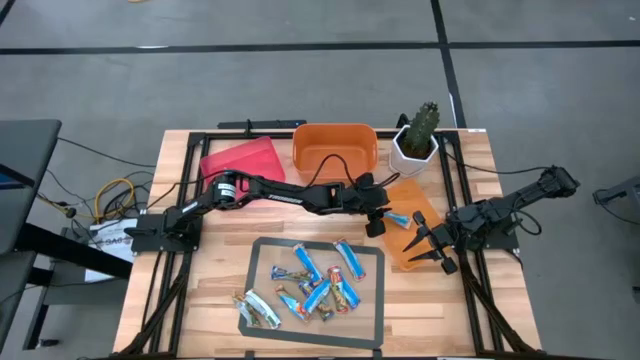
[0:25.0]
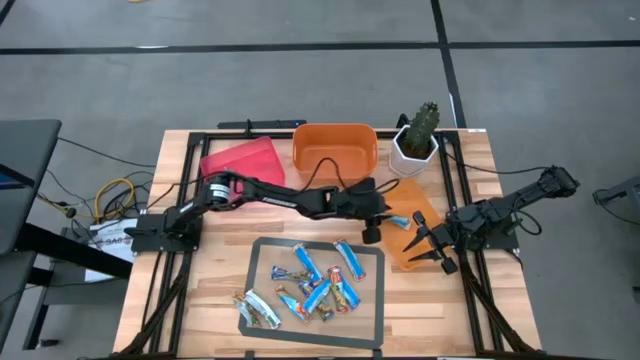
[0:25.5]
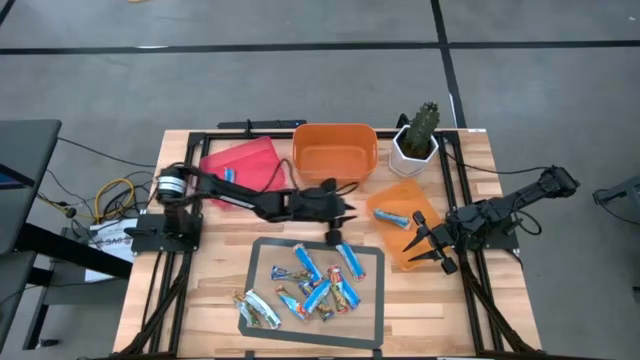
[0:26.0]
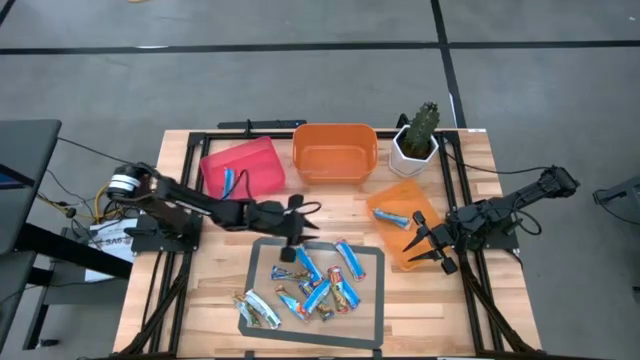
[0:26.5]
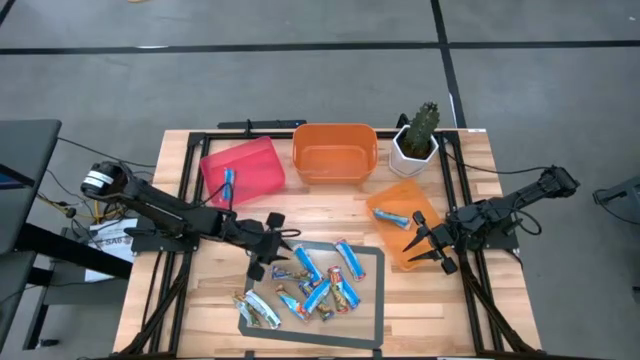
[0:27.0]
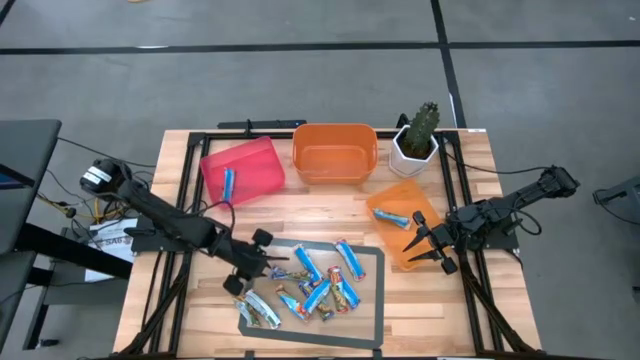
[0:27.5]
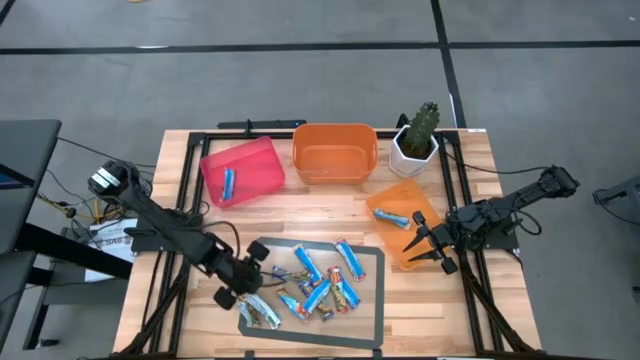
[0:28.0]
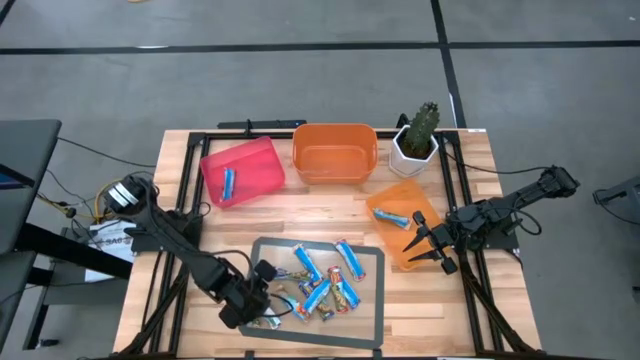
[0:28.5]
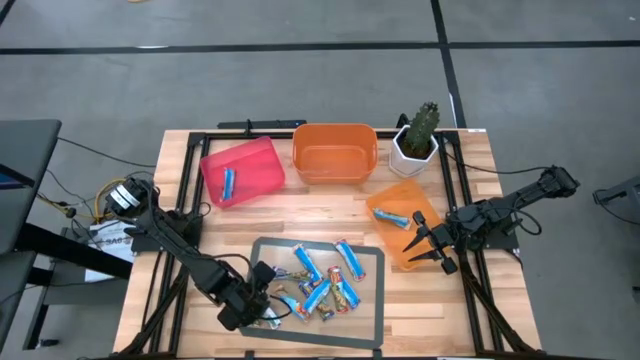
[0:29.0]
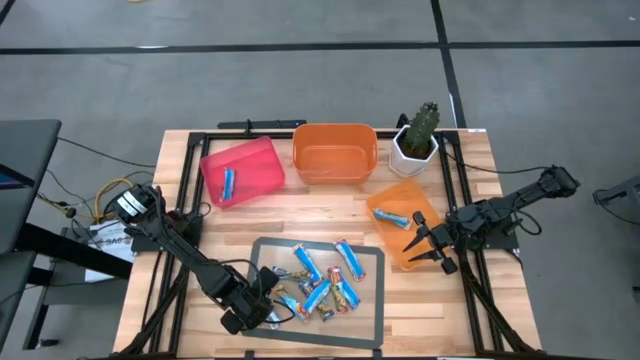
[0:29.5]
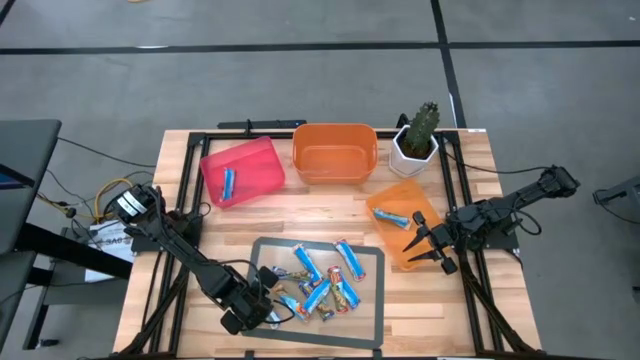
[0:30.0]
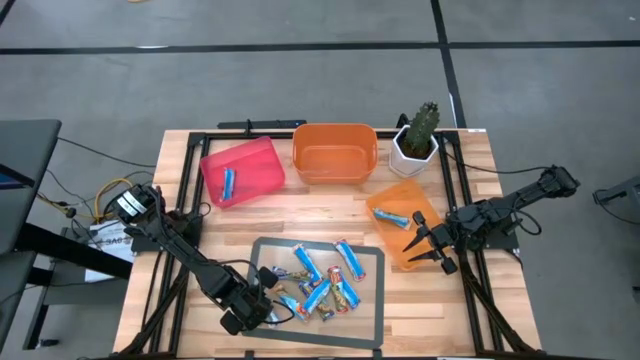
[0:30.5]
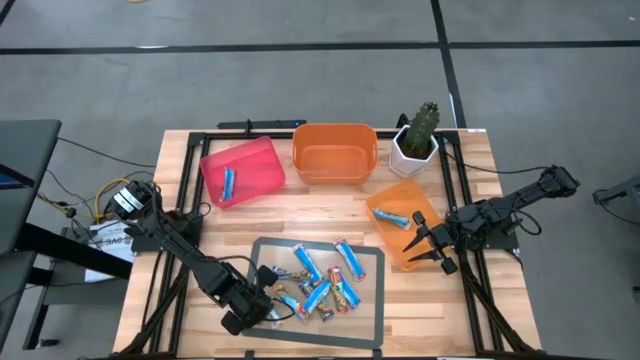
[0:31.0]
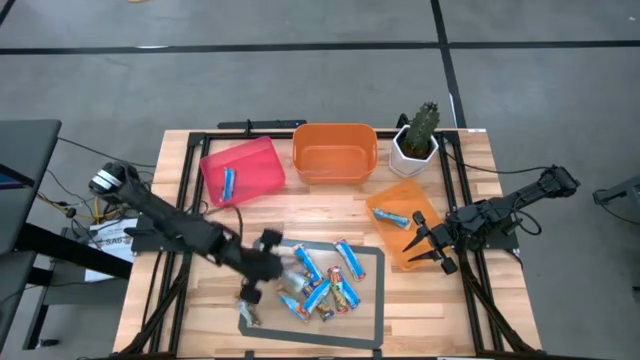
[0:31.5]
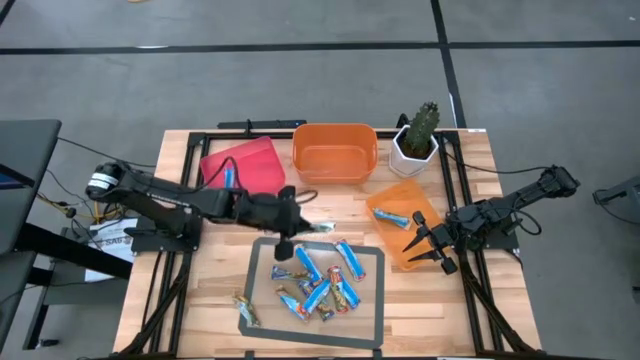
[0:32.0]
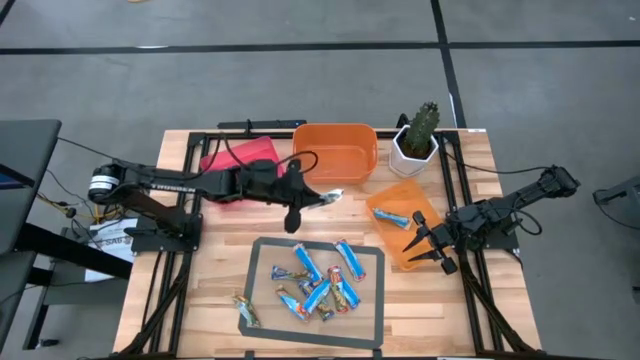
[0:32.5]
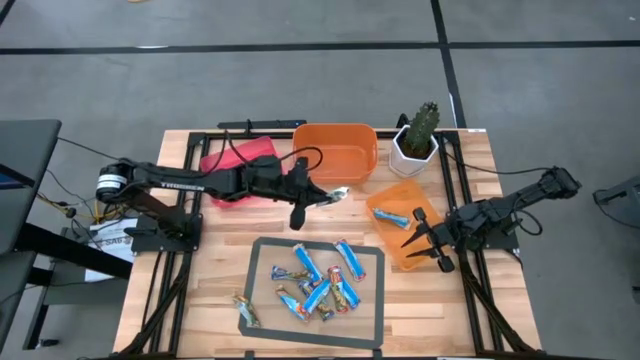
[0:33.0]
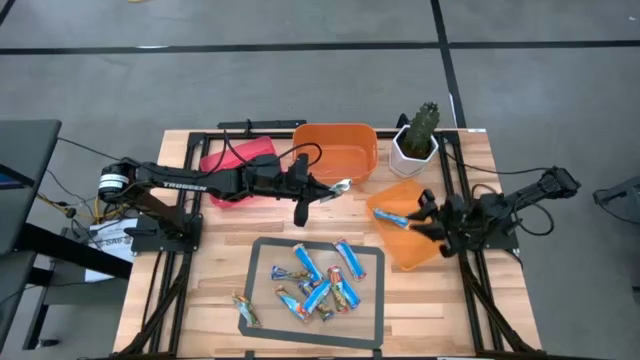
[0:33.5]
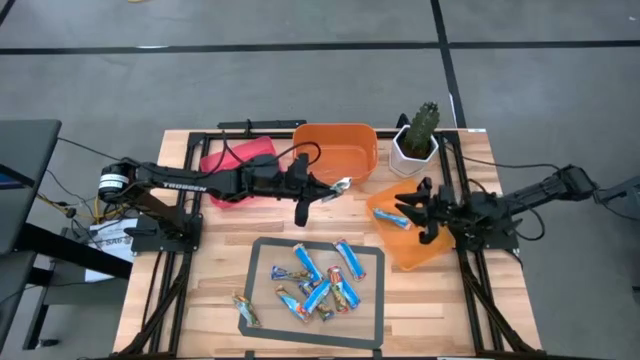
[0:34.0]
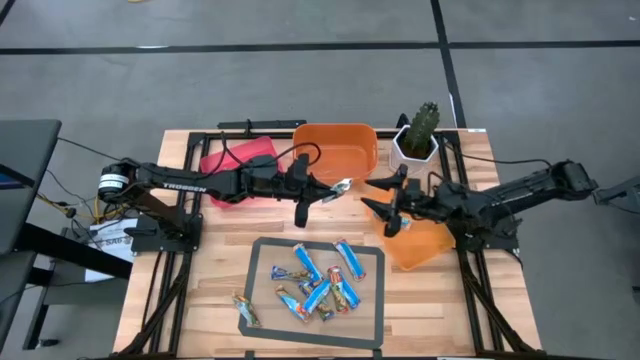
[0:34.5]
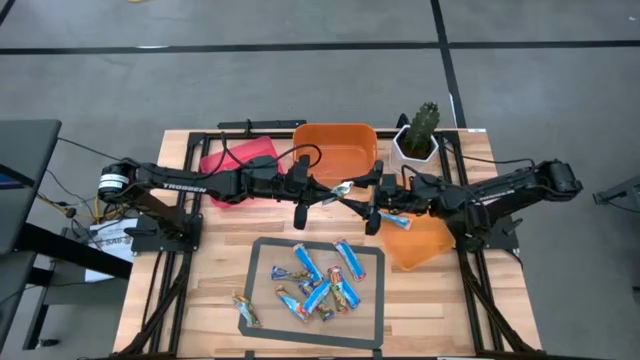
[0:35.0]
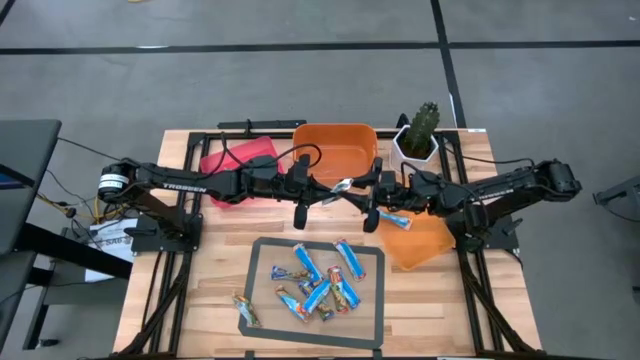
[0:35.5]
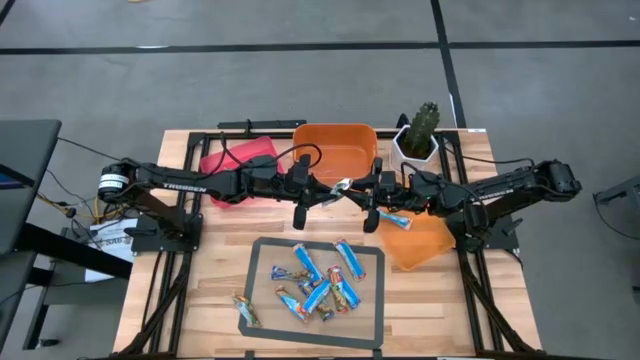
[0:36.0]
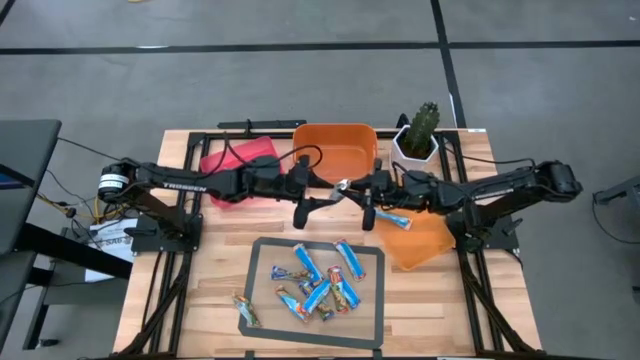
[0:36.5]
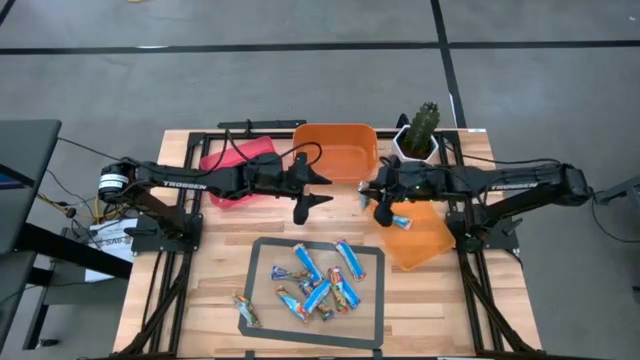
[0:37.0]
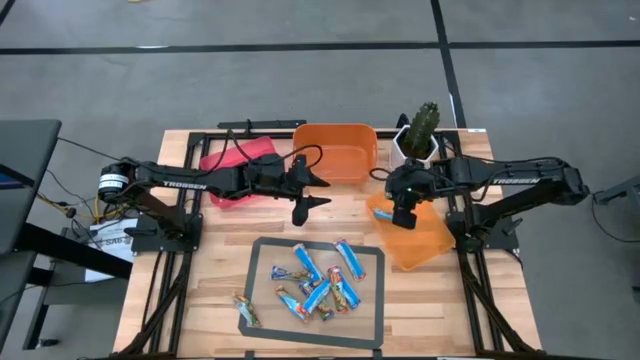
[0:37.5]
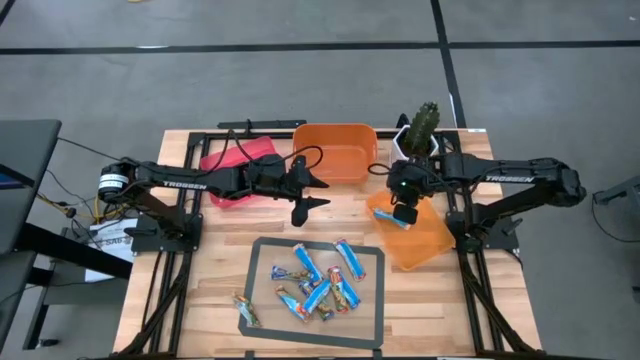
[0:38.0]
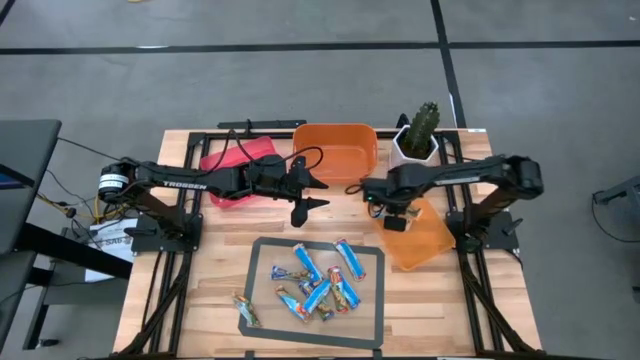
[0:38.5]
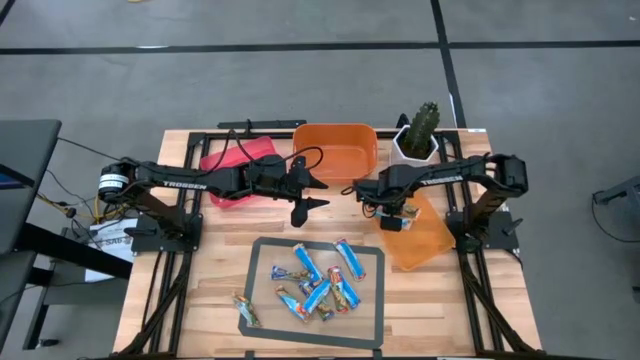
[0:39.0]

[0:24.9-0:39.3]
Task: Pick and place Granola Bars by type
Put the orange granola bar into the light orange bin

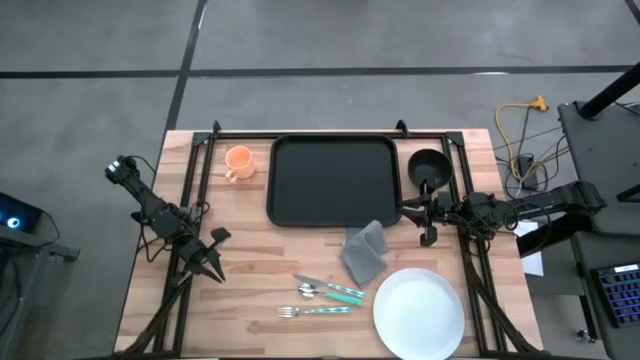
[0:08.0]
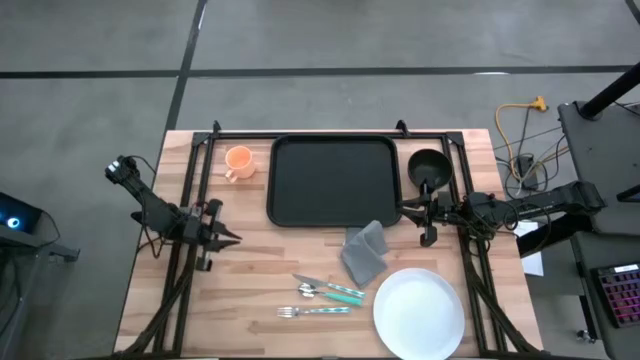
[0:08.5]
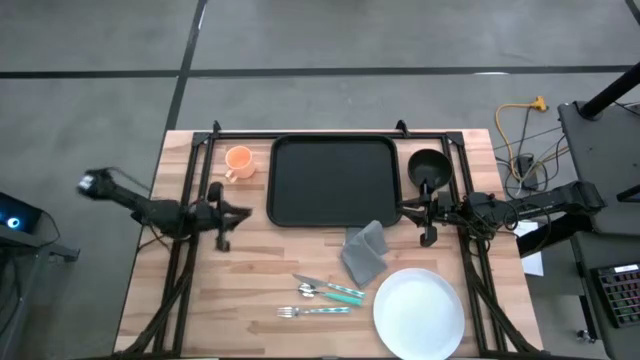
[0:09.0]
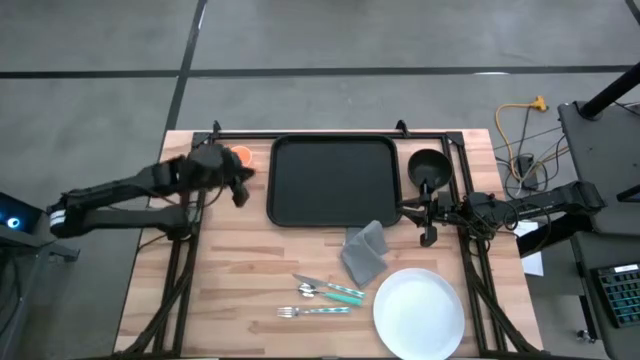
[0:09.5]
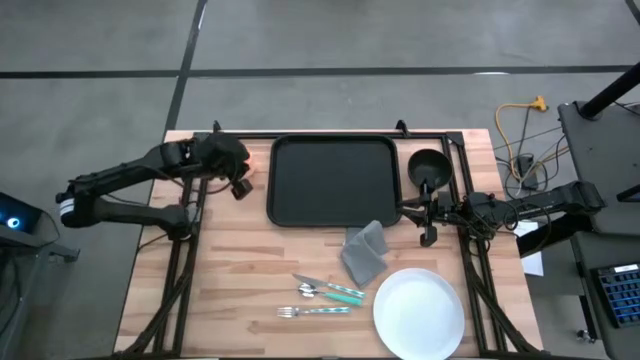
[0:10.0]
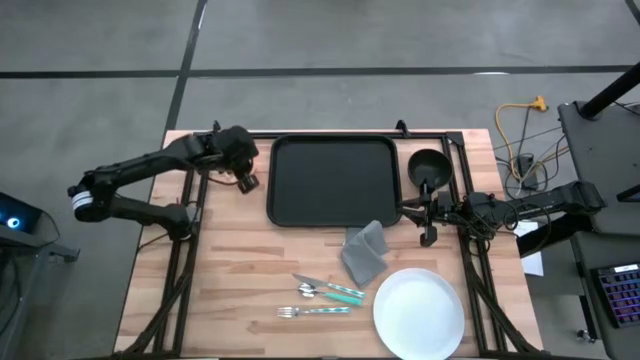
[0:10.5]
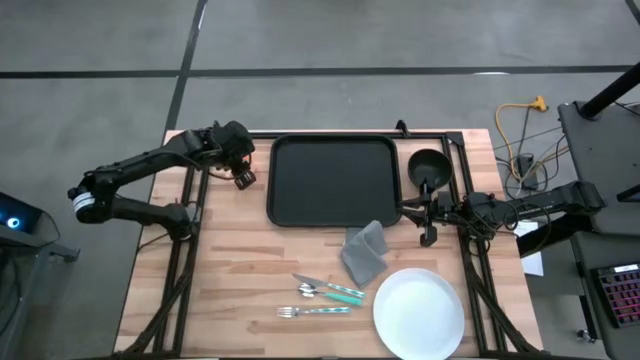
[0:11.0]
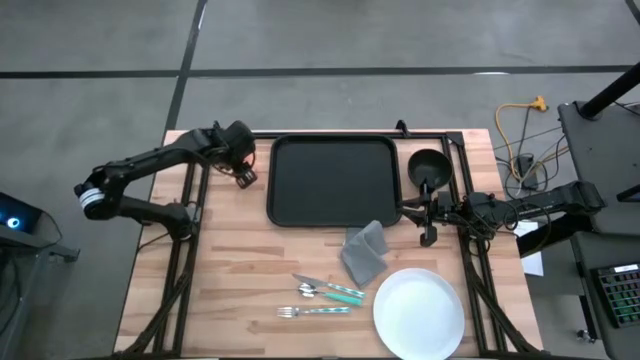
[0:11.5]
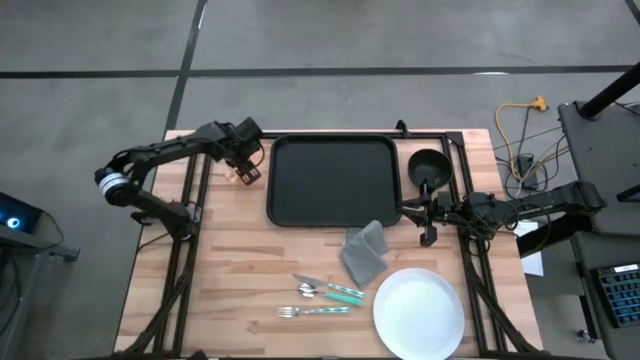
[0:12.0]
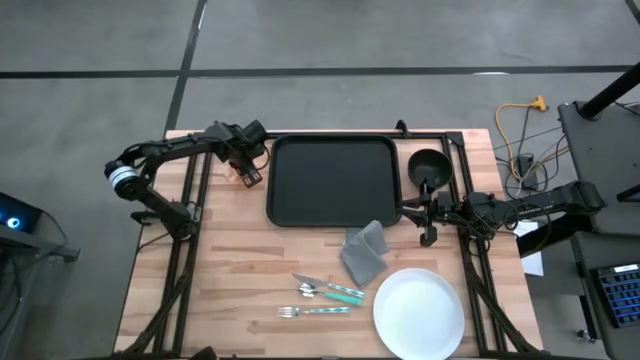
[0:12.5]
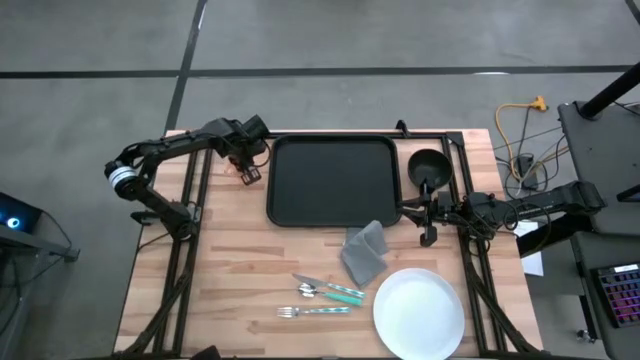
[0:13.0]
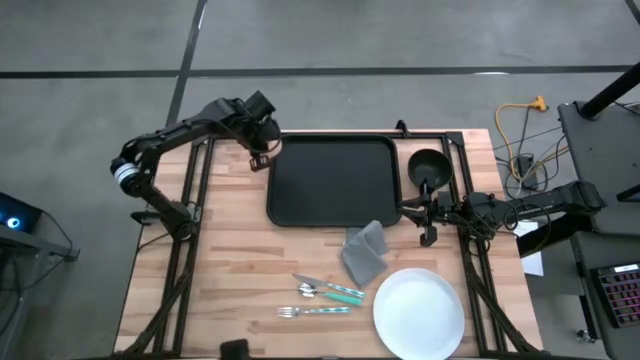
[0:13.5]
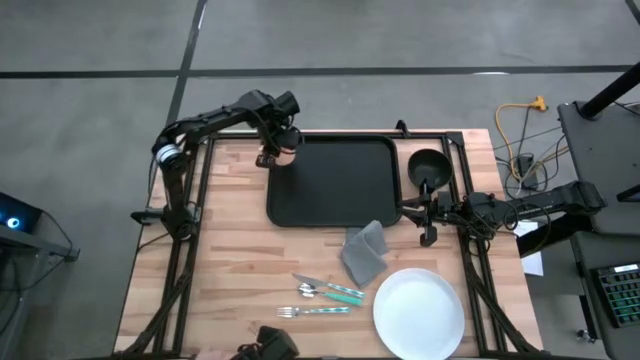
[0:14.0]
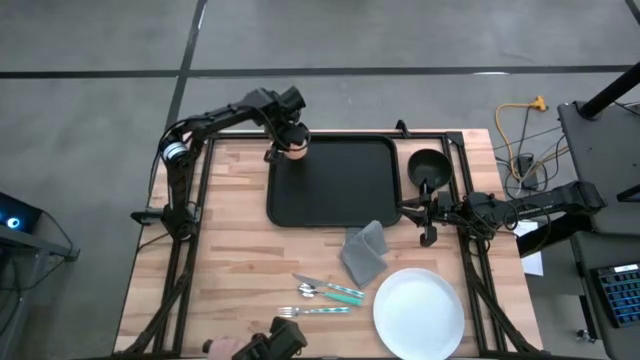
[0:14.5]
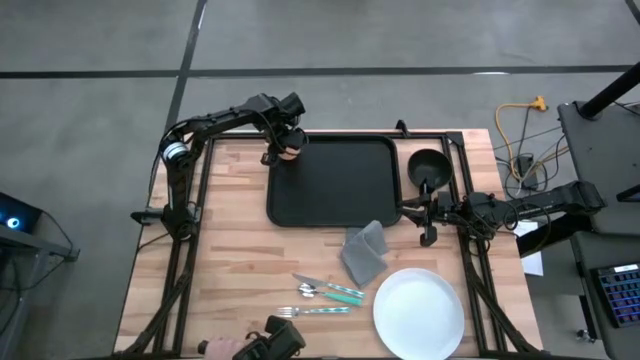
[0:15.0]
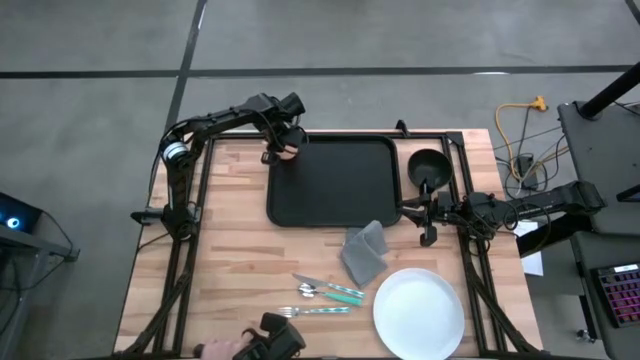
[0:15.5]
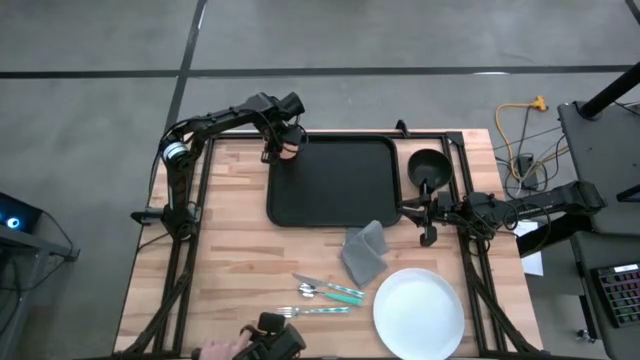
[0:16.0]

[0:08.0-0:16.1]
Task: Set up tray
Put the yellow cup on the top left side of the black tray
